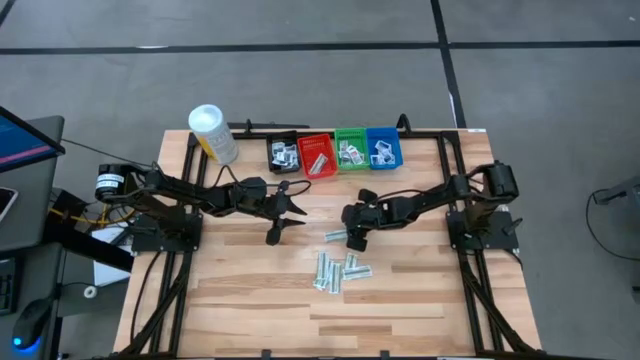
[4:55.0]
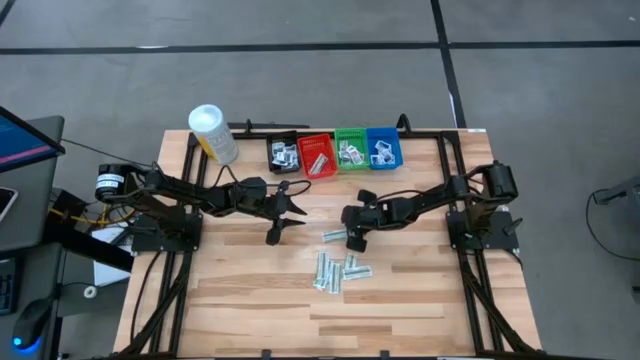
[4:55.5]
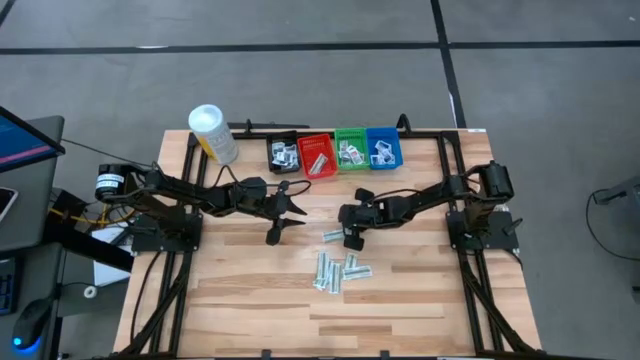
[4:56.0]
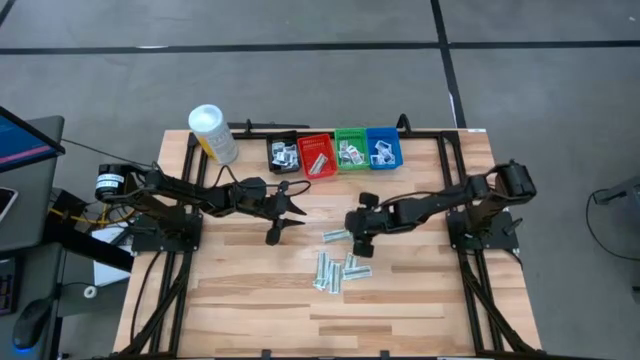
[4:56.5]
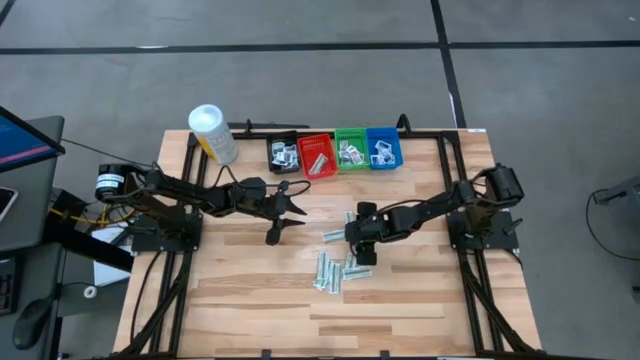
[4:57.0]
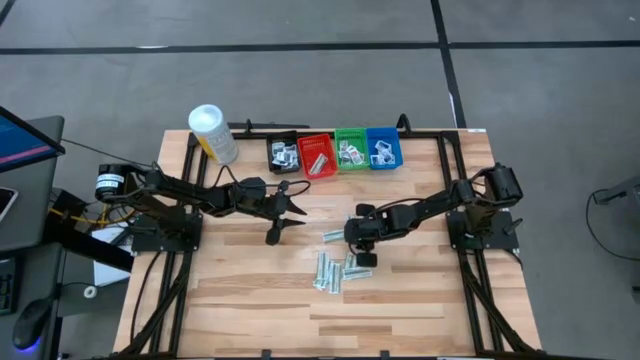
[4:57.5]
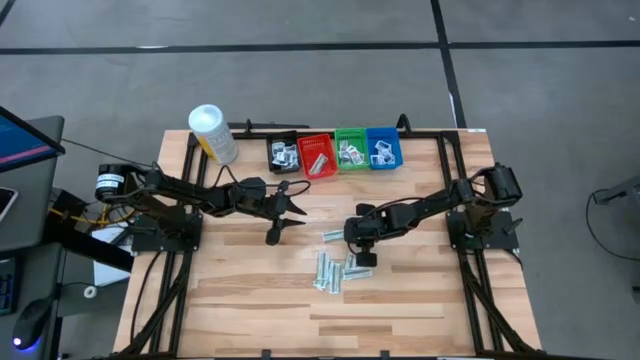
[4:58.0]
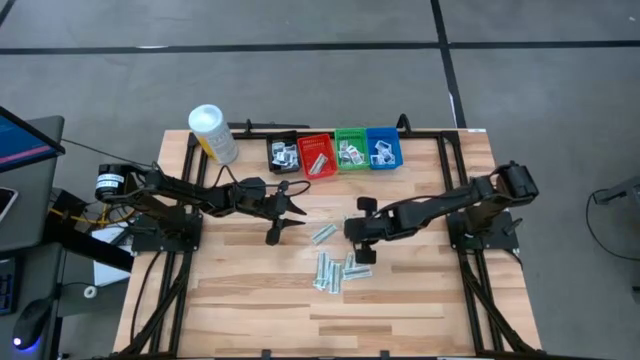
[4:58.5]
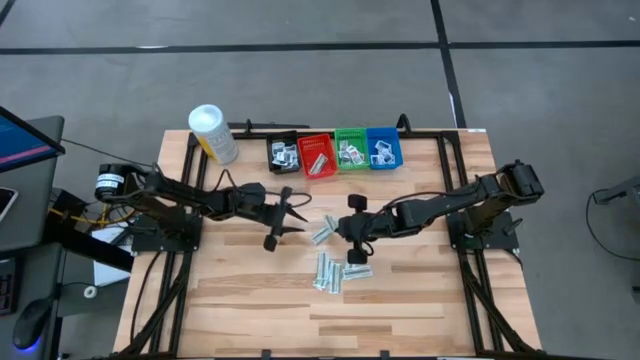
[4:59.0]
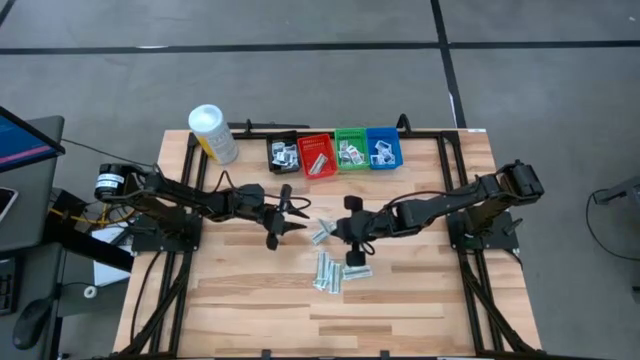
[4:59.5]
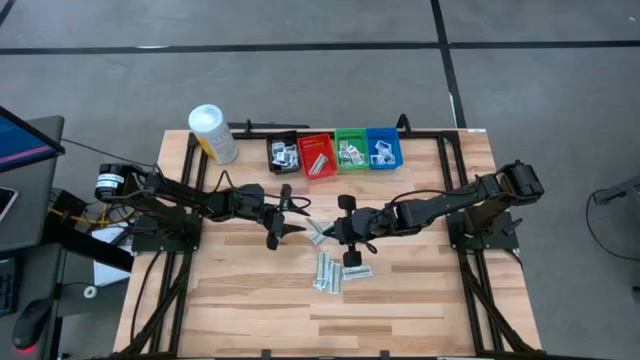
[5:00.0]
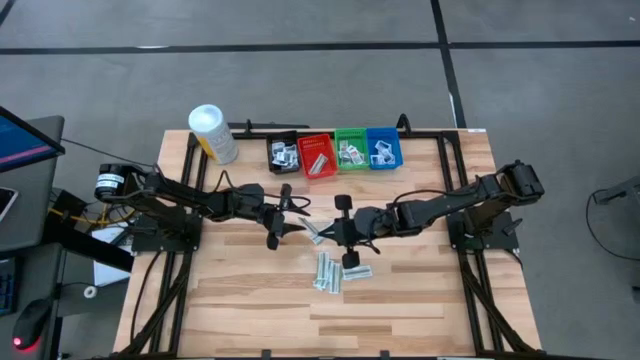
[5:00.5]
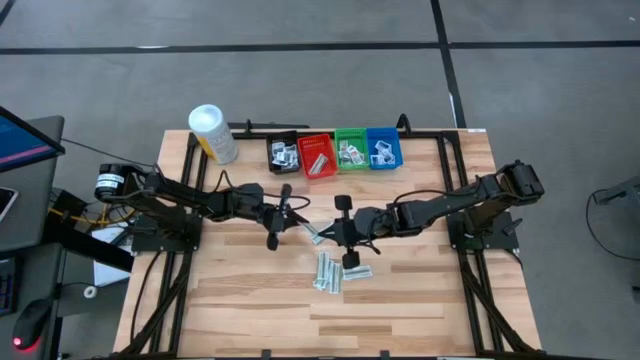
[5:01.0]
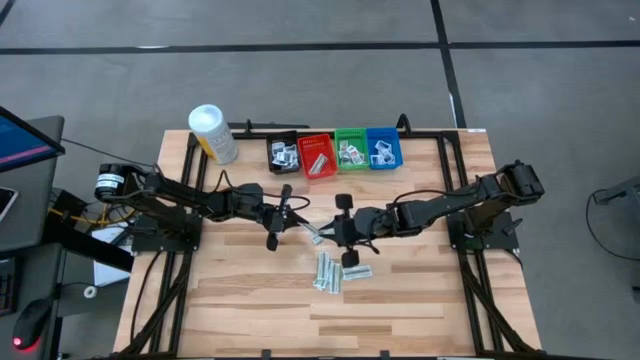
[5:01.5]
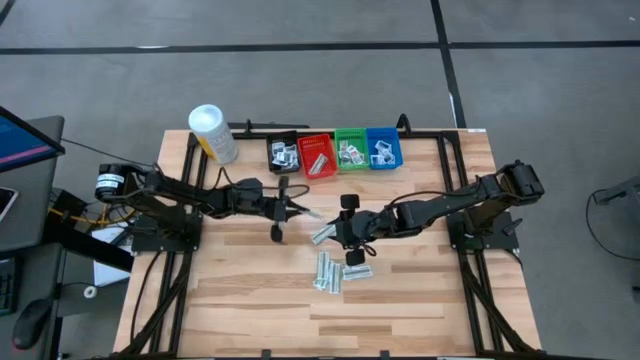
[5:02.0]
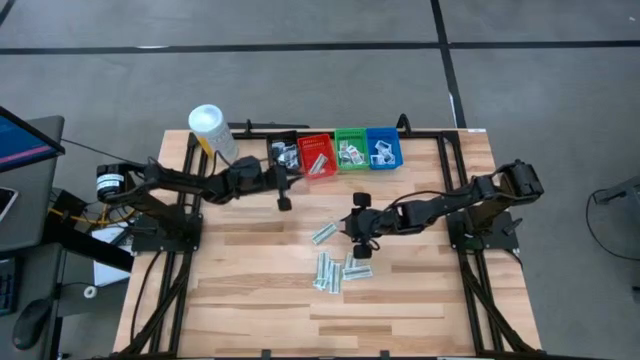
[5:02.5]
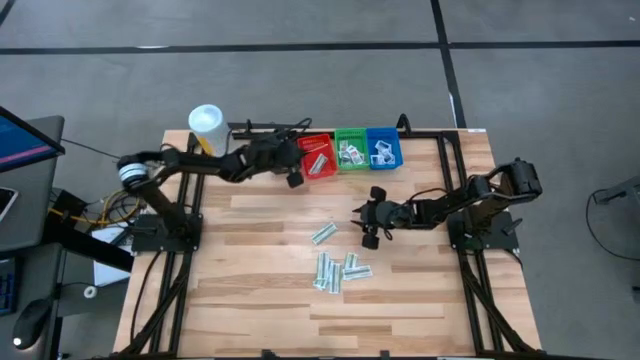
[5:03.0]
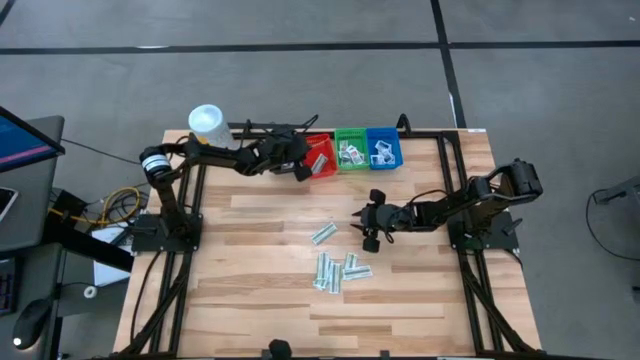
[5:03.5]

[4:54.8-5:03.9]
Task: Pick & Place First Aid Supplies
Put the green bandage pack into the red bin

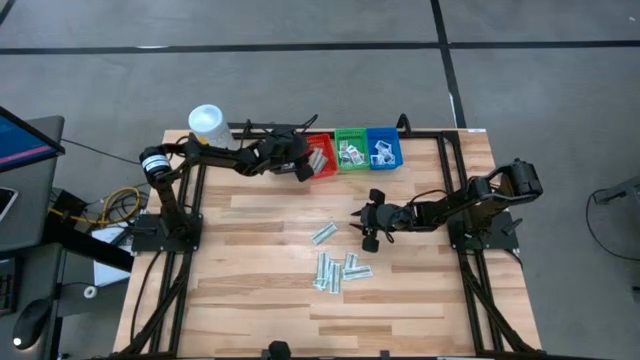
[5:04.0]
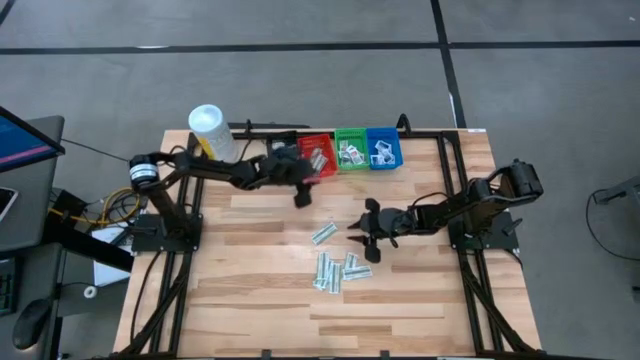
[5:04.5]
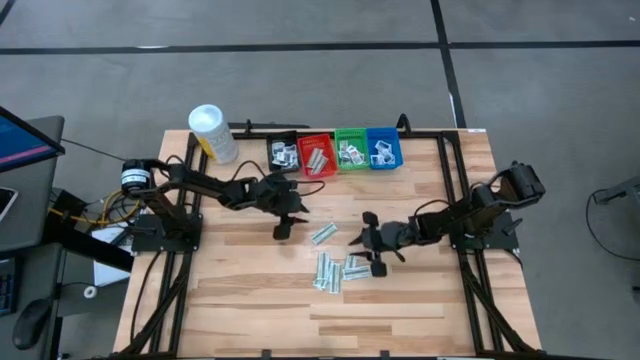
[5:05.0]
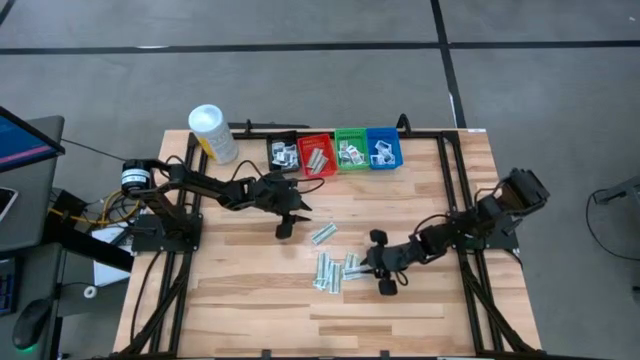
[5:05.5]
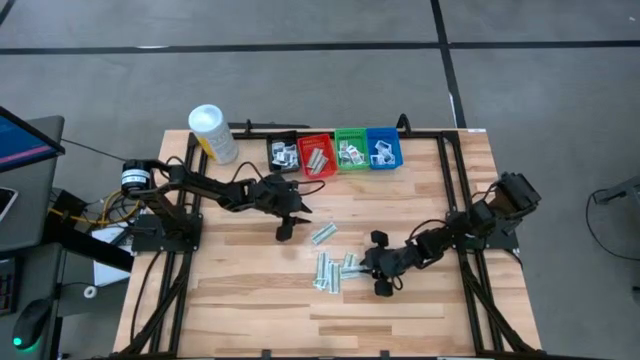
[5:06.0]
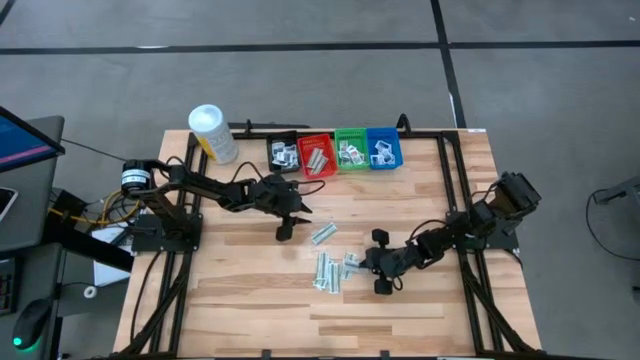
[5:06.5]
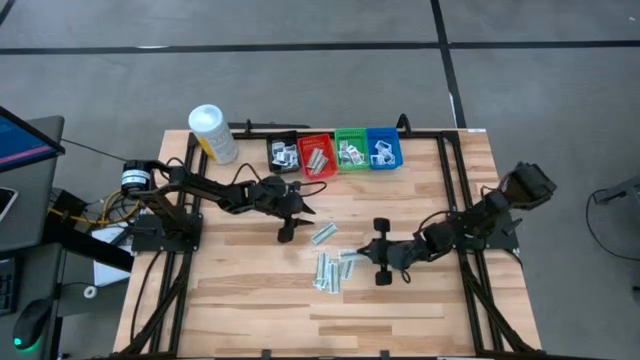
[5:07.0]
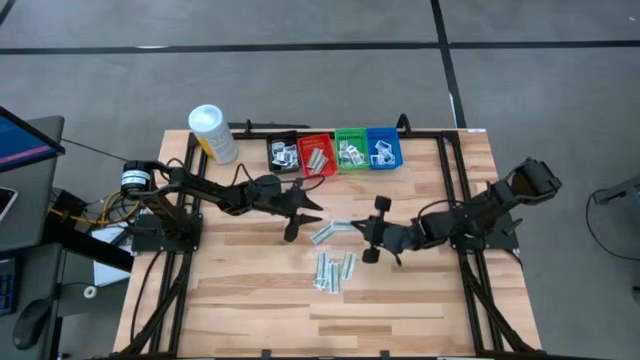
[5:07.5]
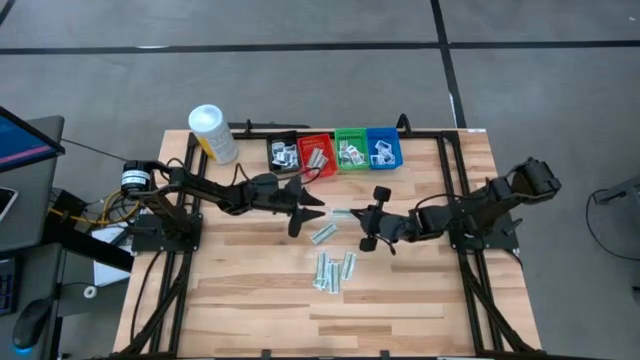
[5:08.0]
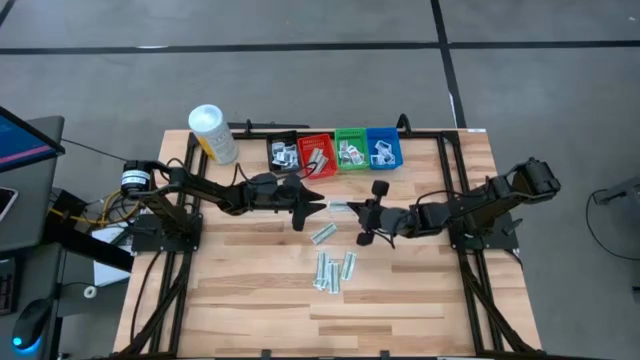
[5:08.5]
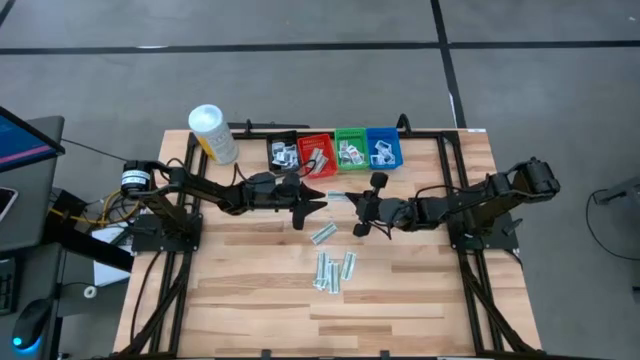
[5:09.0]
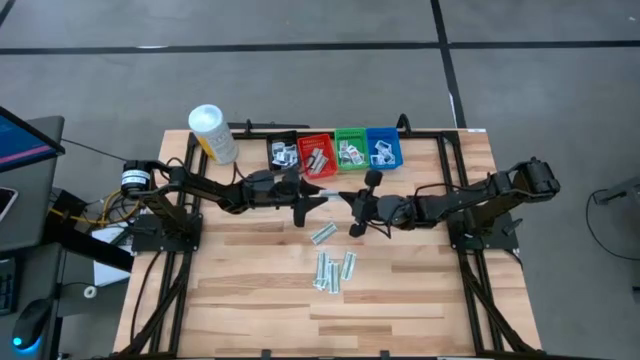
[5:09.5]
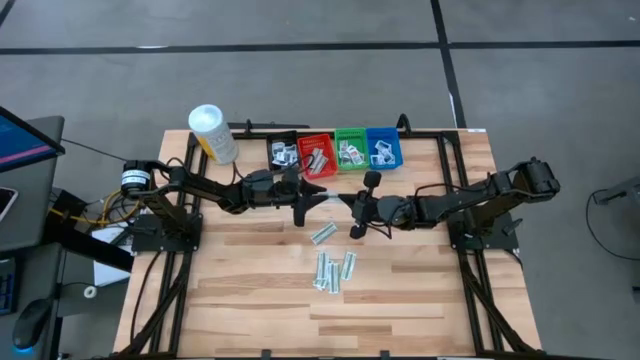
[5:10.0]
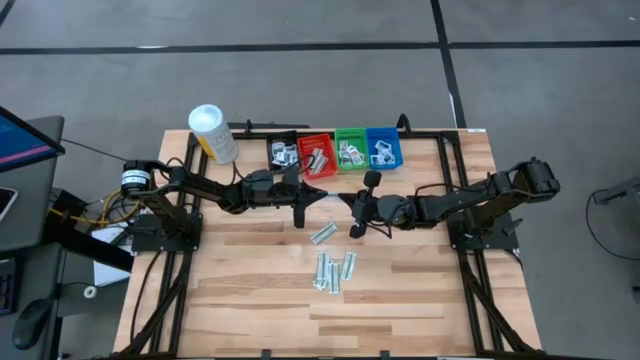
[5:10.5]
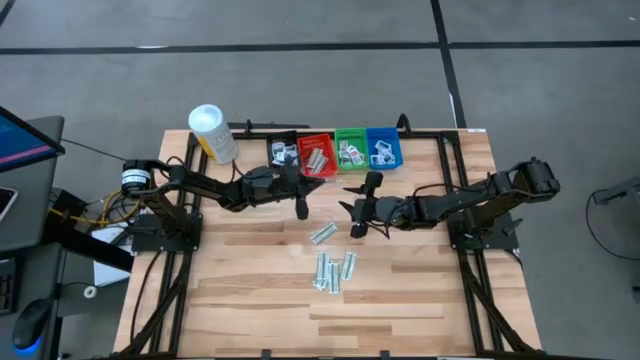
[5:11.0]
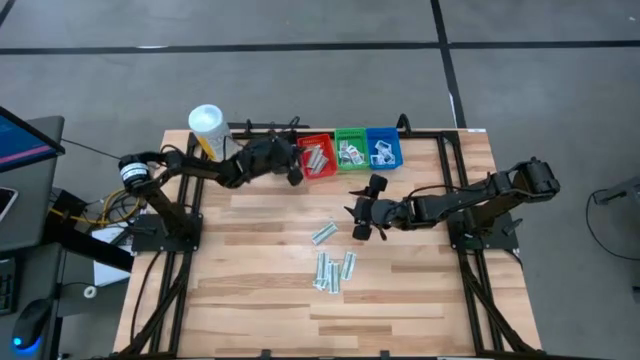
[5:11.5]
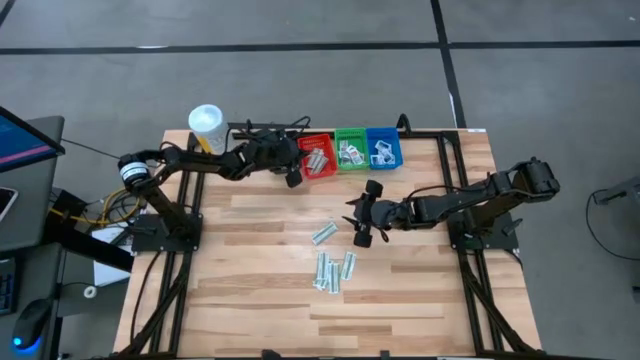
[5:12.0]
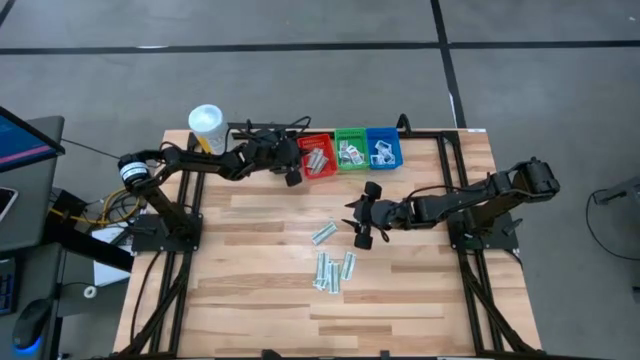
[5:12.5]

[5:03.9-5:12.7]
Put the green bandage pack into the red bin

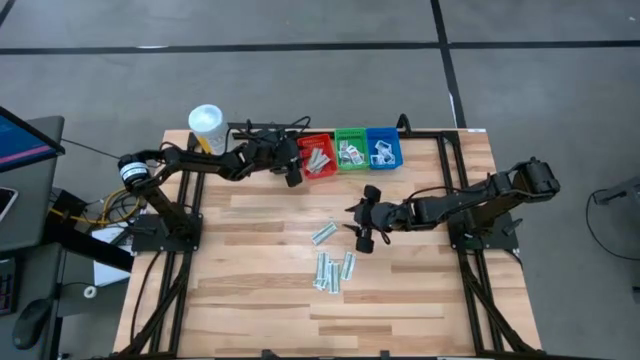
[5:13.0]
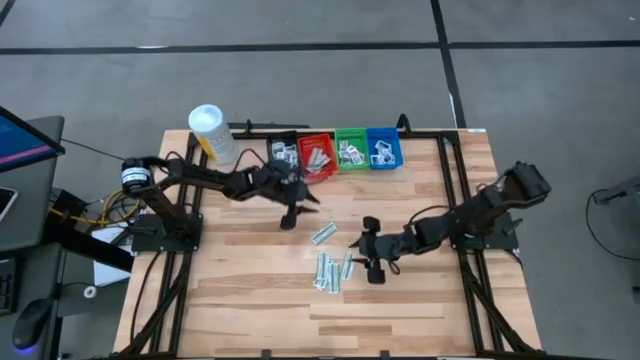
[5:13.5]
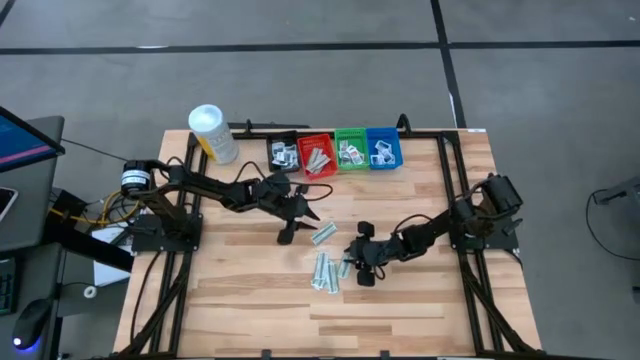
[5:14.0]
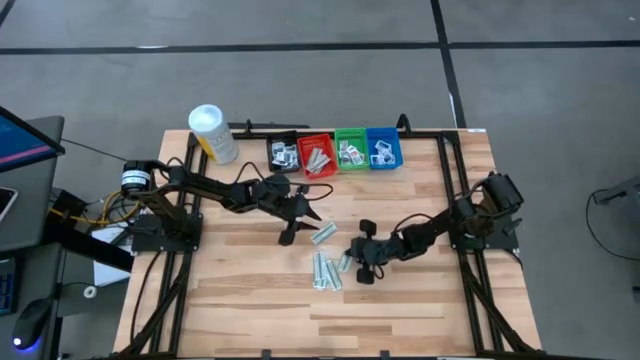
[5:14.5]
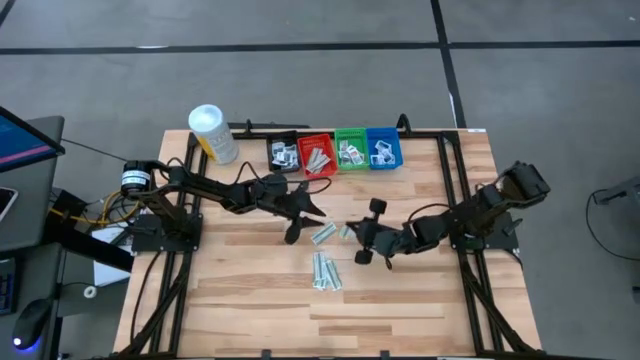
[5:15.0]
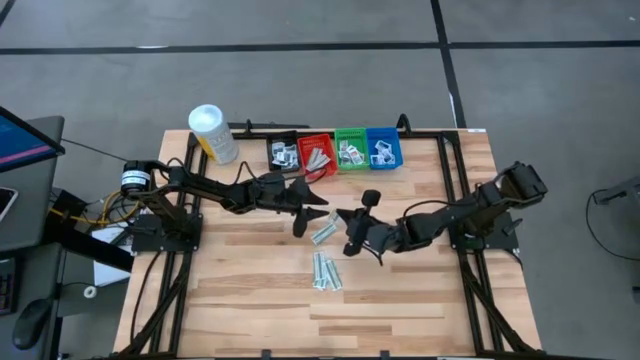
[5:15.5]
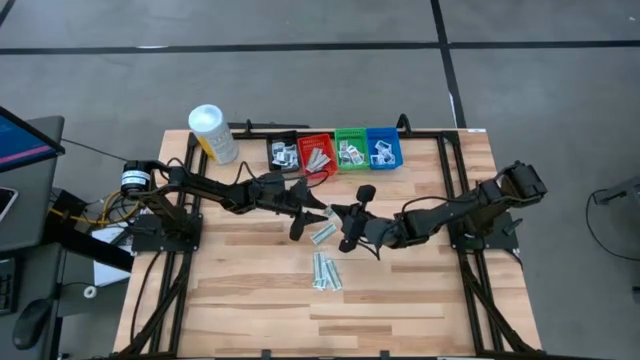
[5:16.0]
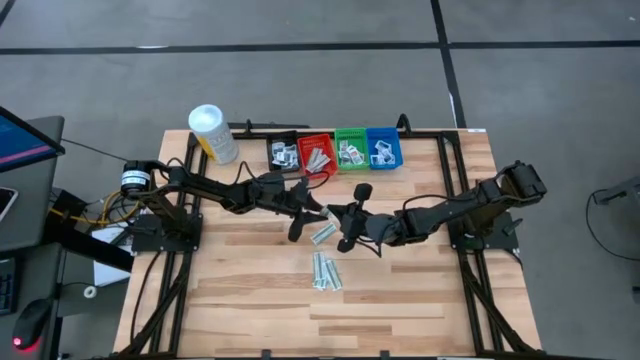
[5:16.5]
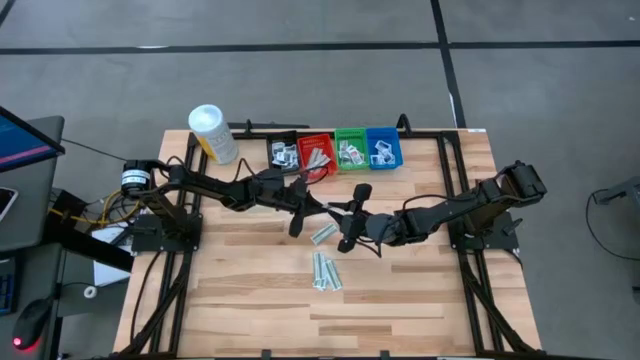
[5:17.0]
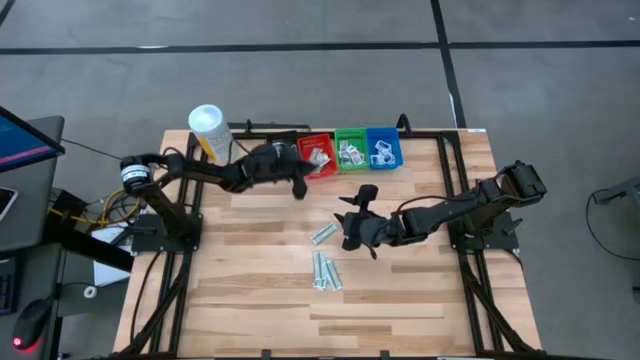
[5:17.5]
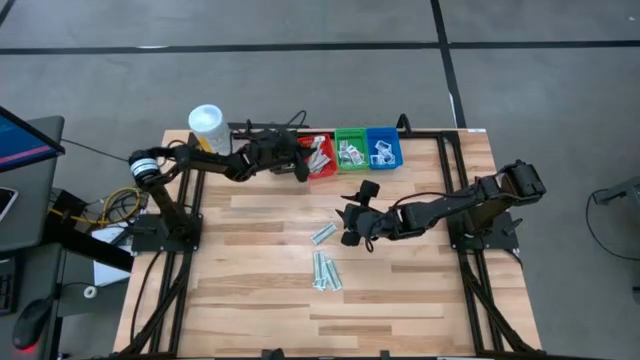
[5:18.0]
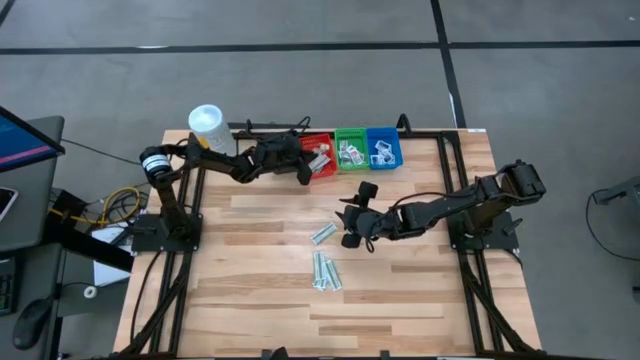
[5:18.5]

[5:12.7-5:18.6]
Put the green bandage pack into the red bin
